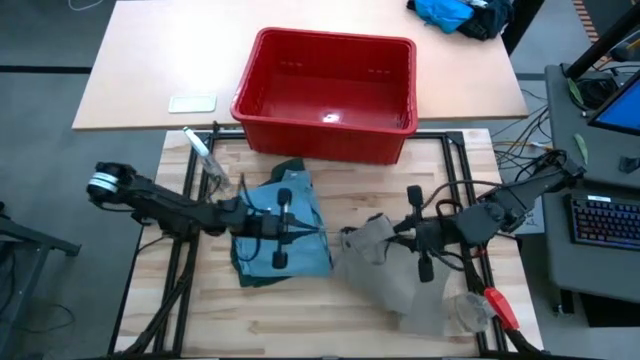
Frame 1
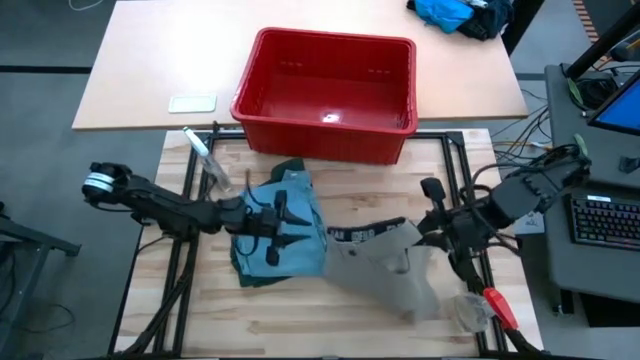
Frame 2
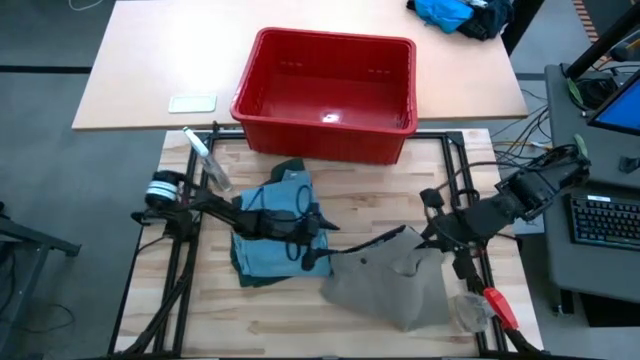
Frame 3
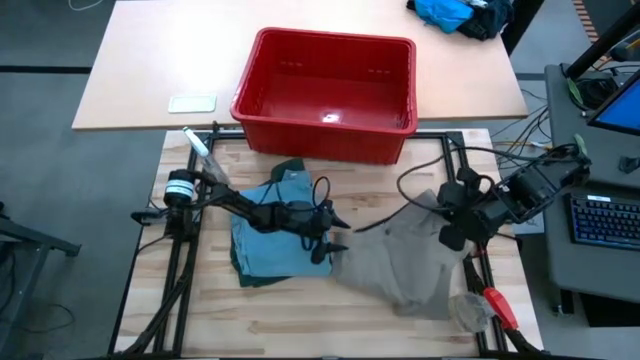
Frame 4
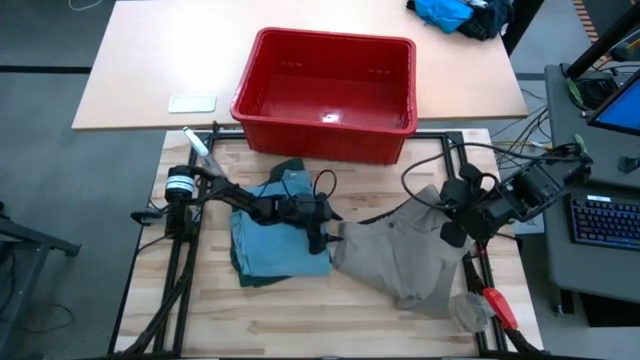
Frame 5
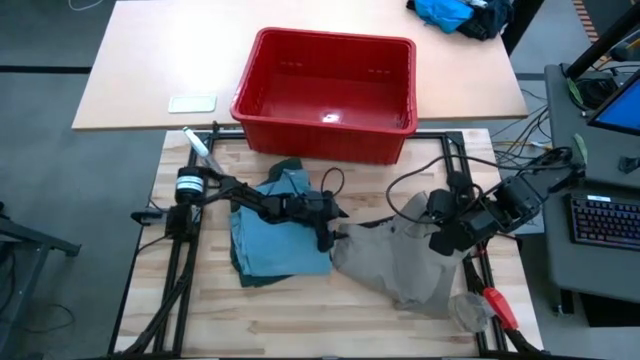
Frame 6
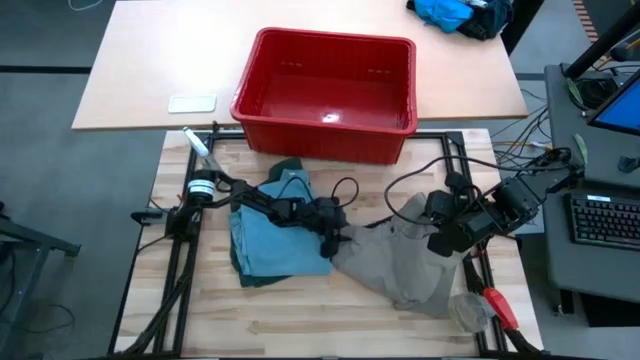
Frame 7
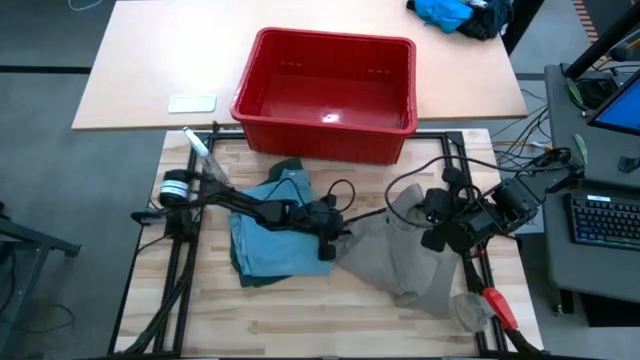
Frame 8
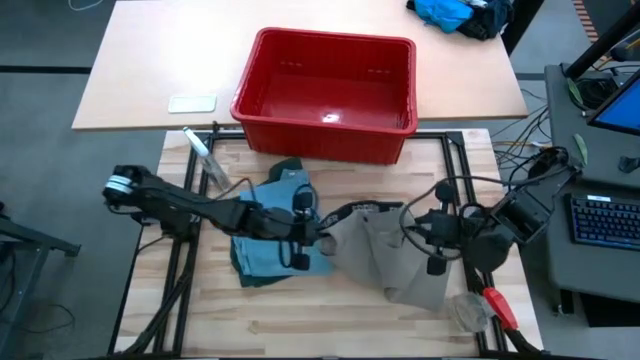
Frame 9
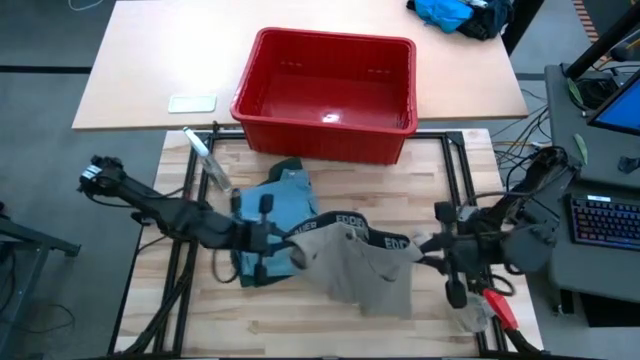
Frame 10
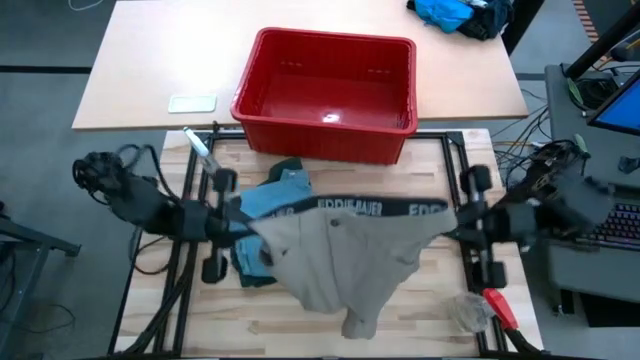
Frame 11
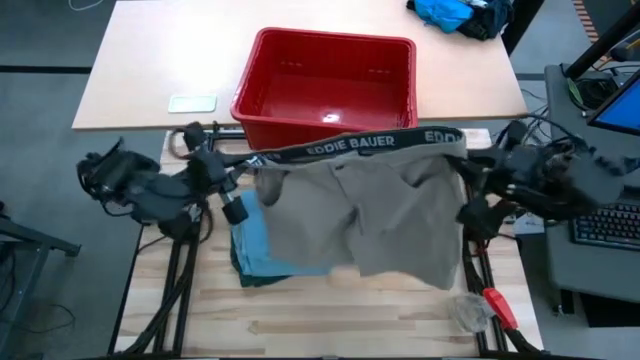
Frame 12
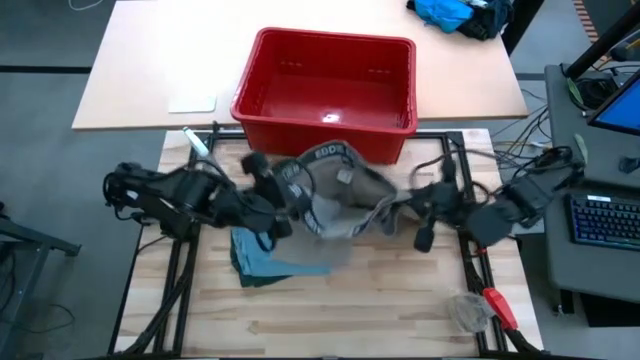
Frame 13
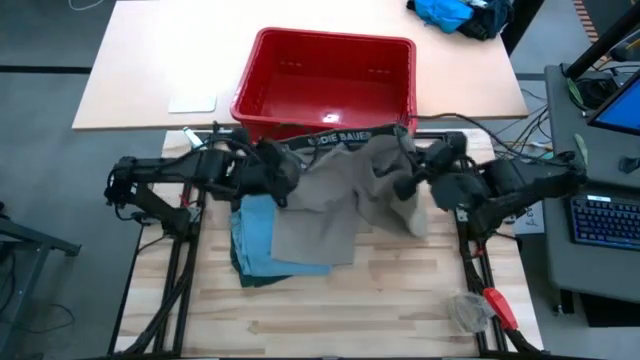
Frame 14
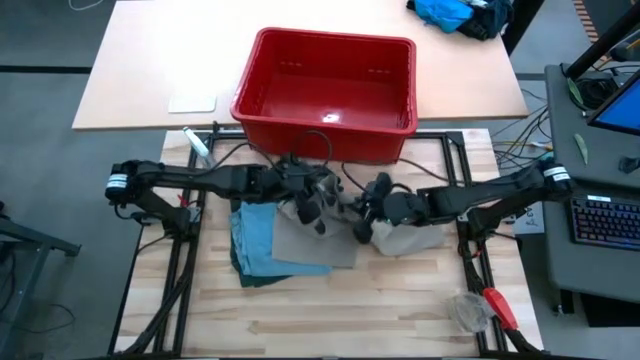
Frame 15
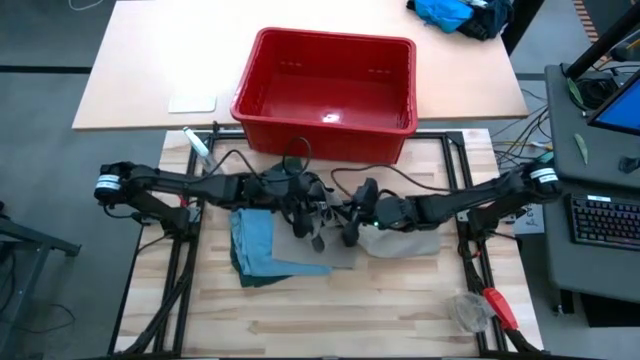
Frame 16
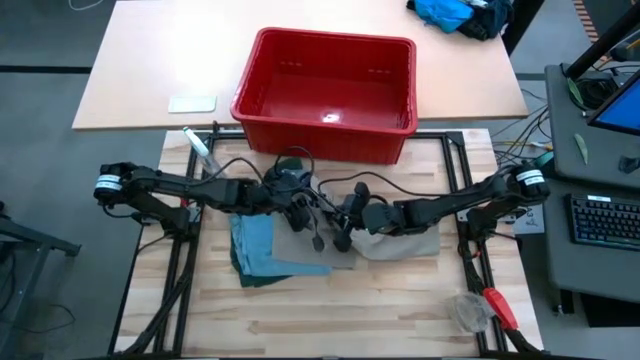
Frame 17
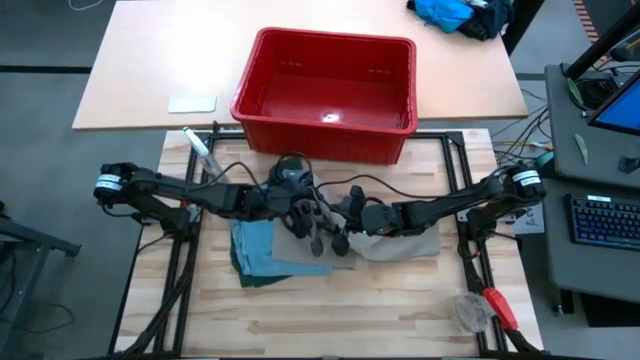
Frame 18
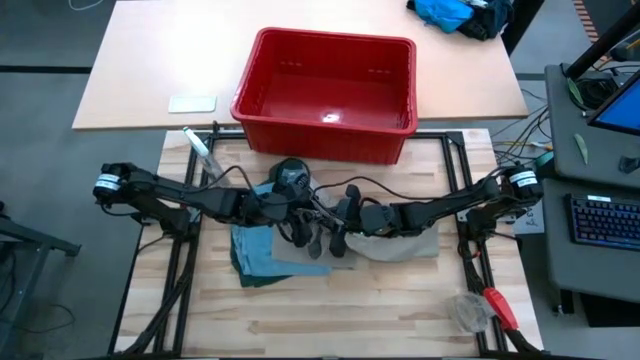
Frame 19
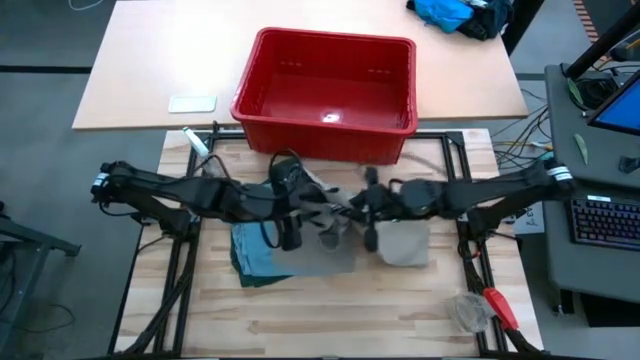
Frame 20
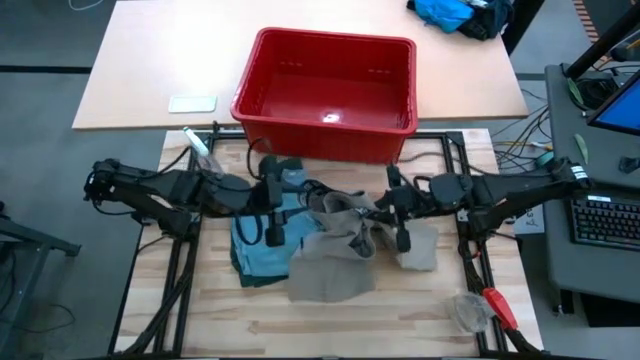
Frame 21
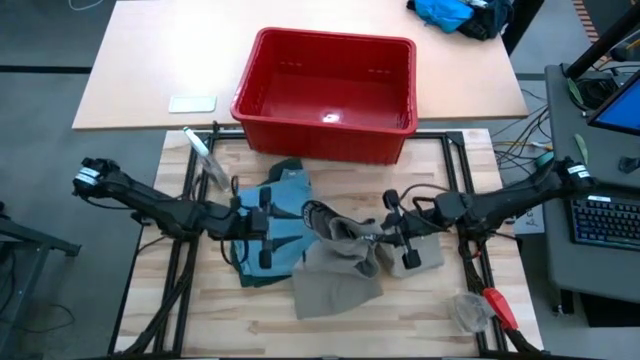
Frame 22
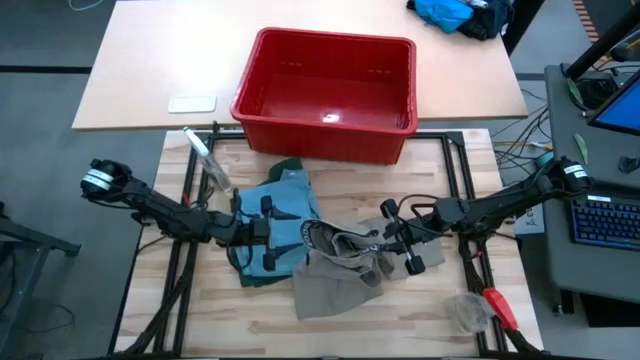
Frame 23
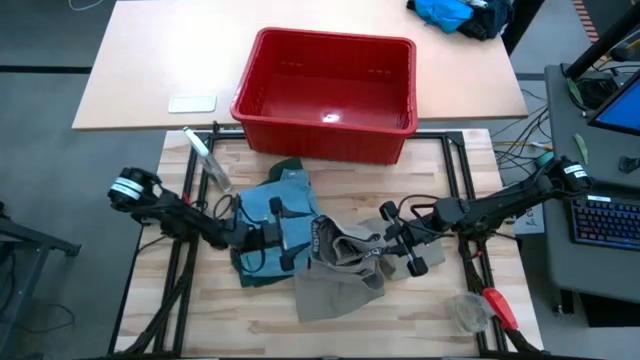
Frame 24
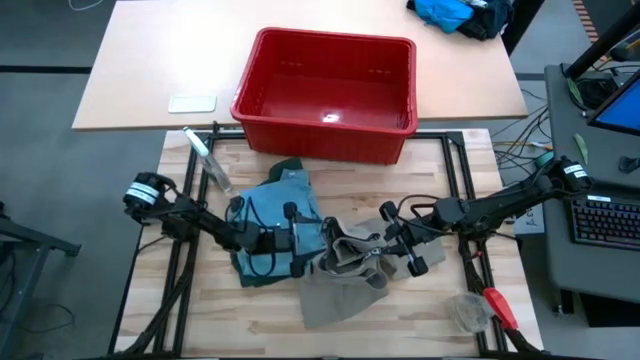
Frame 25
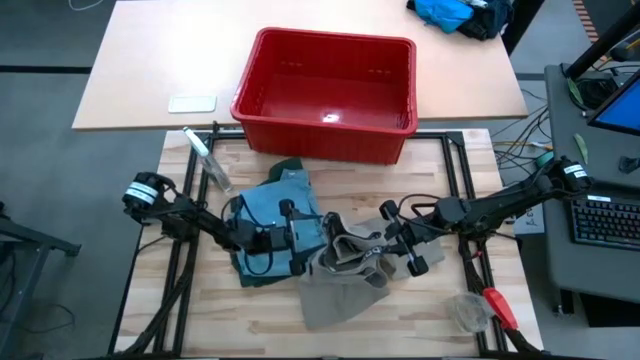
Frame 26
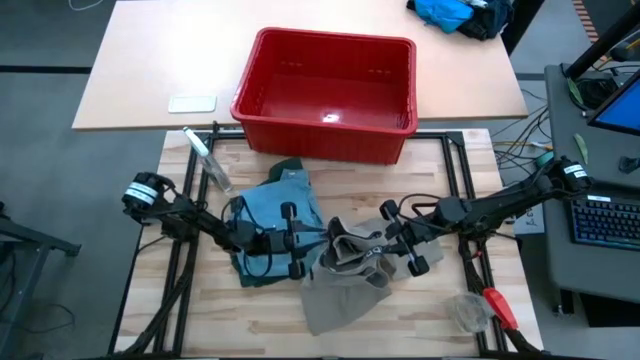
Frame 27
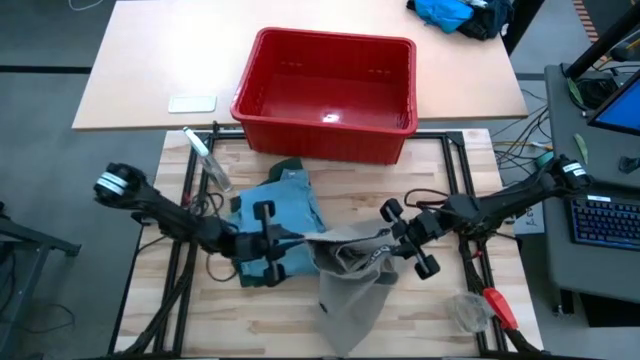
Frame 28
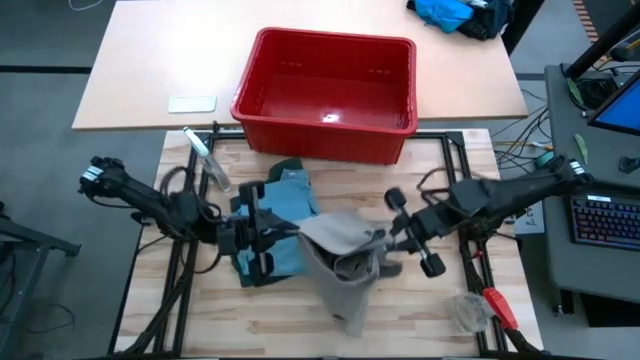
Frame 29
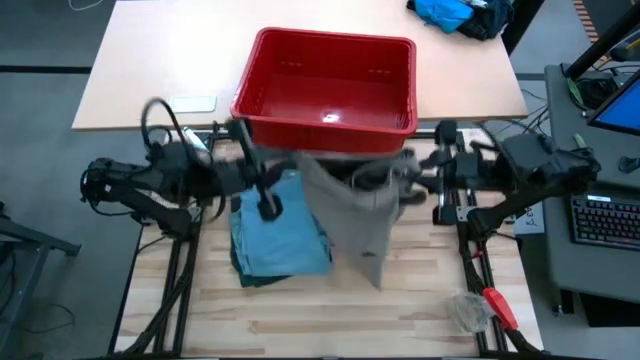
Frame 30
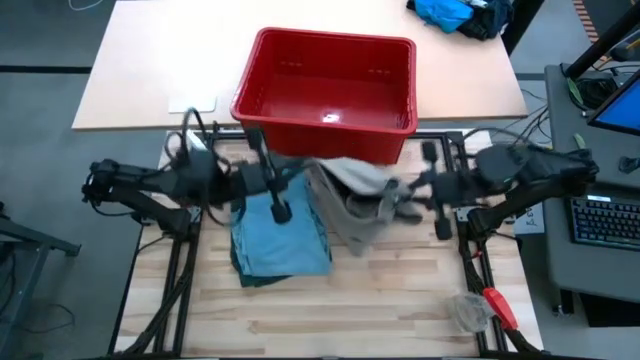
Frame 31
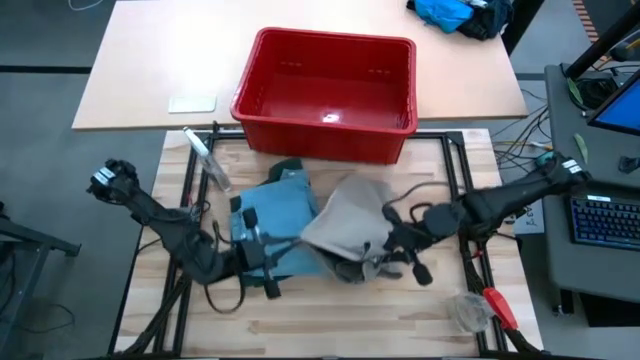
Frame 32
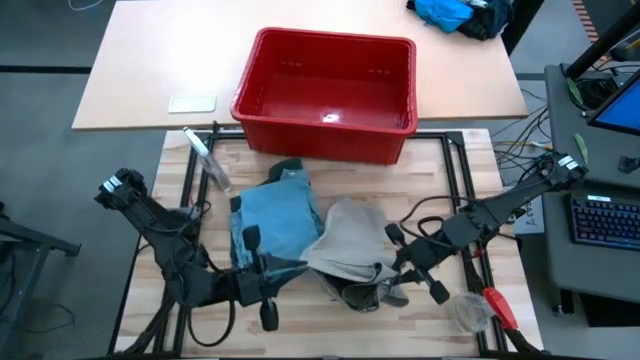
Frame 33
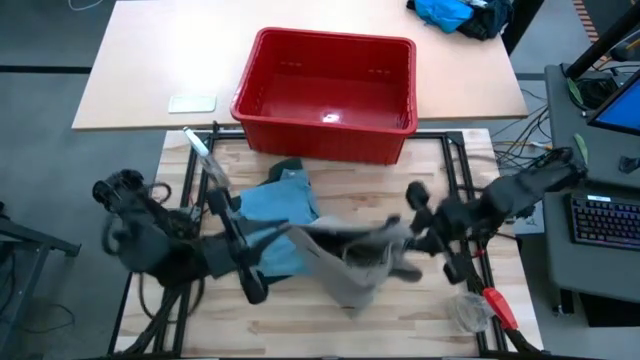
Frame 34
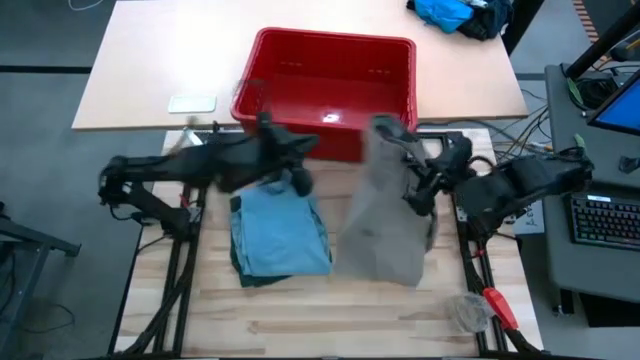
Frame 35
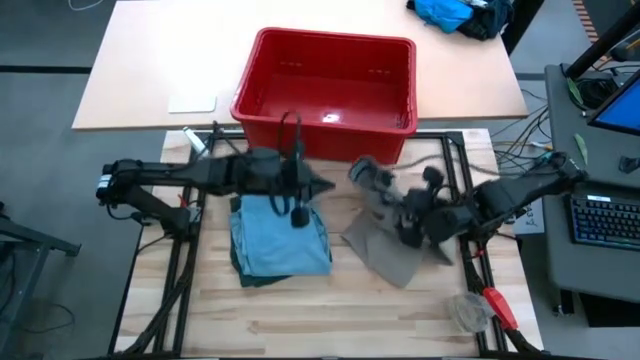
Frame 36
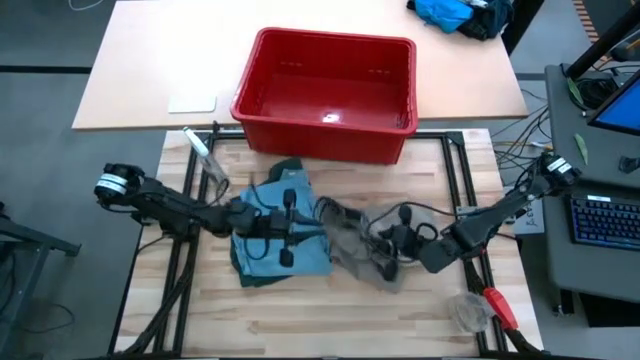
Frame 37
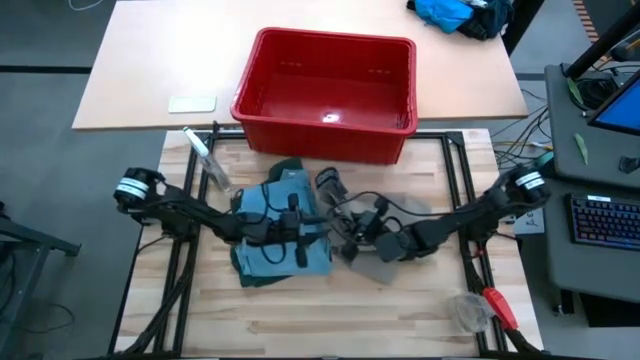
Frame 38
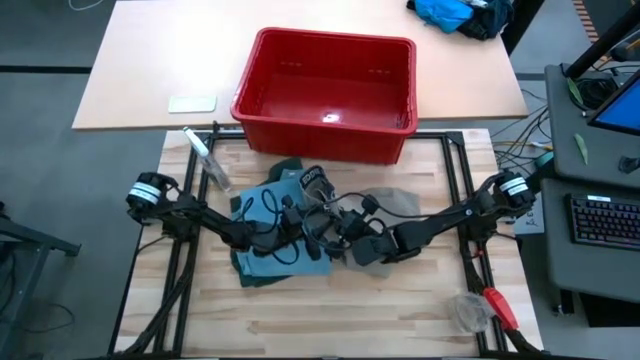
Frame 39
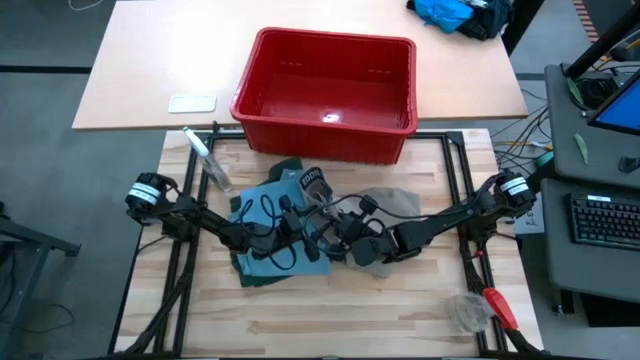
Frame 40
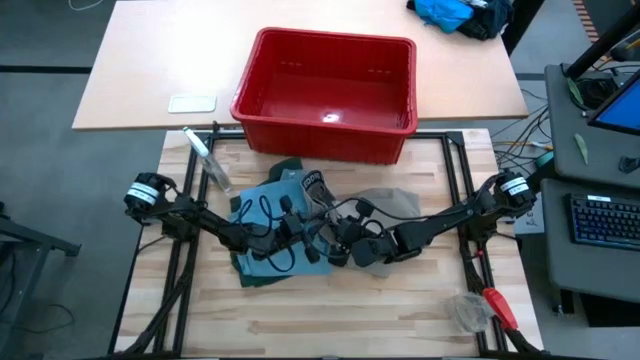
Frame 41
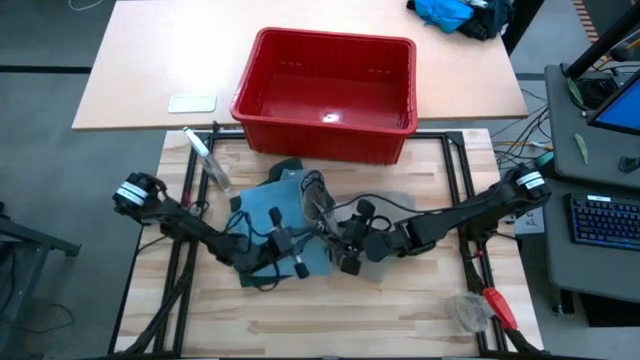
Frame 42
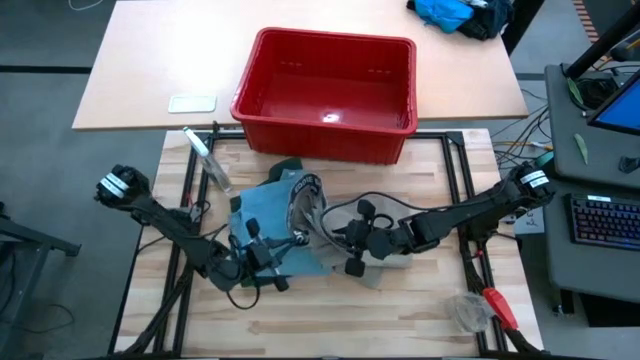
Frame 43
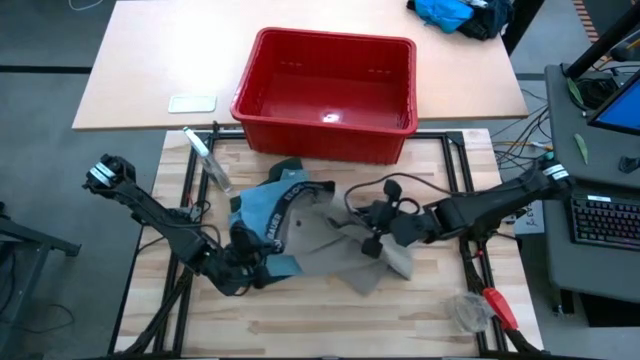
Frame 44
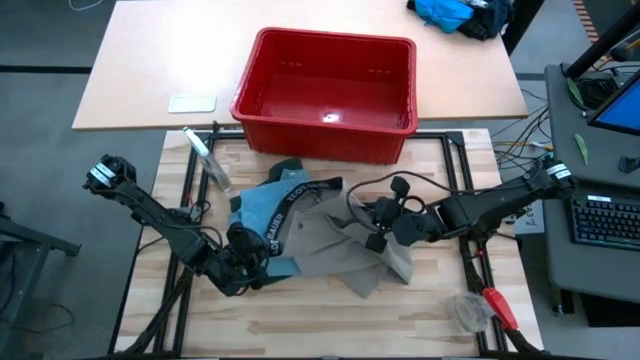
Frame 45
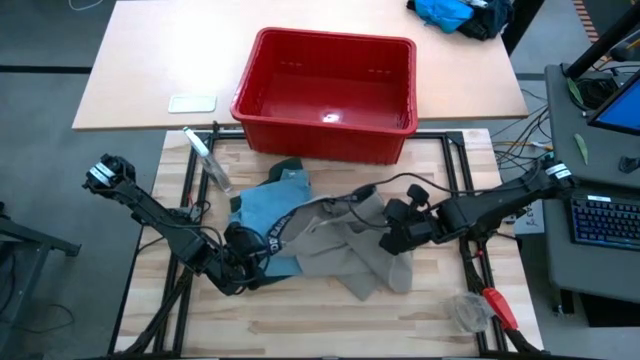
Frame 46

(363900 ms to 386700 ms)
Task: Fold Laundry from Bin
Fold the light brown shorts
